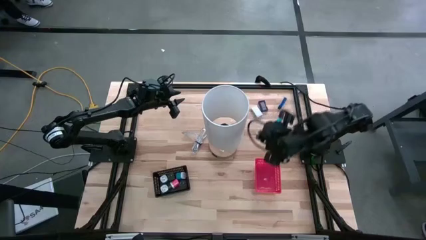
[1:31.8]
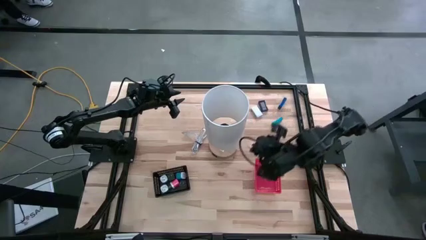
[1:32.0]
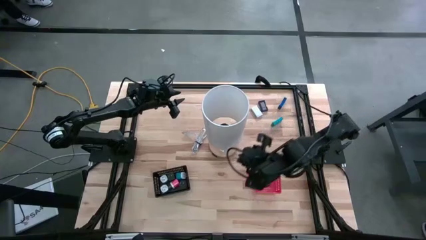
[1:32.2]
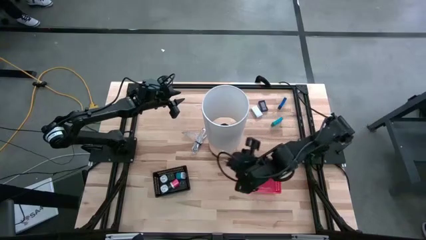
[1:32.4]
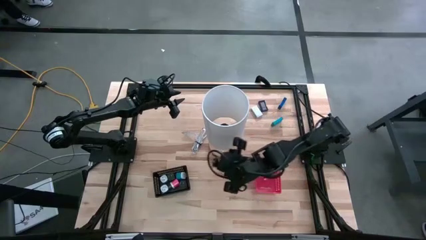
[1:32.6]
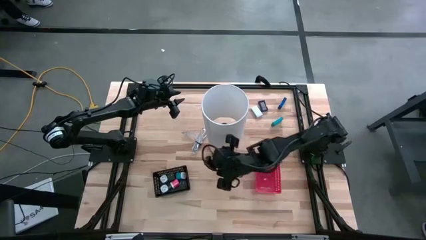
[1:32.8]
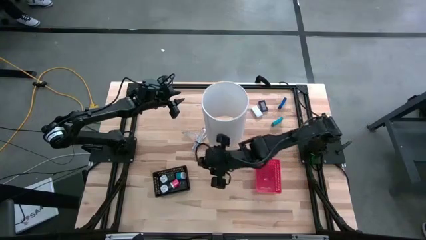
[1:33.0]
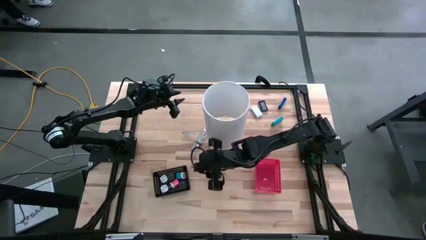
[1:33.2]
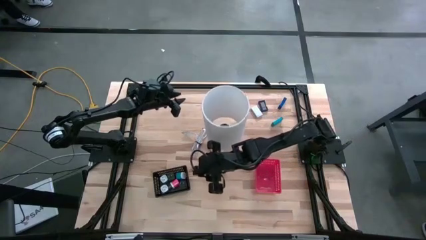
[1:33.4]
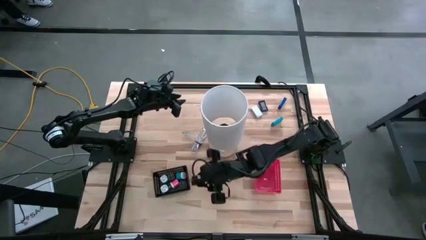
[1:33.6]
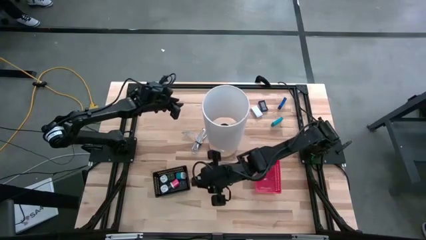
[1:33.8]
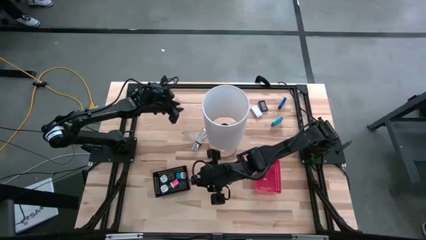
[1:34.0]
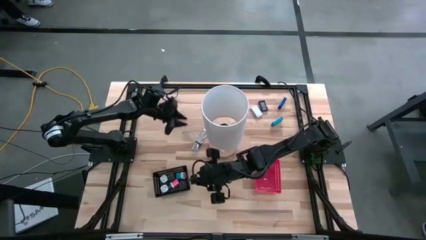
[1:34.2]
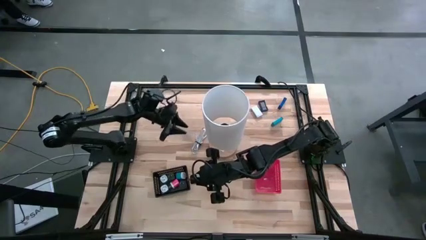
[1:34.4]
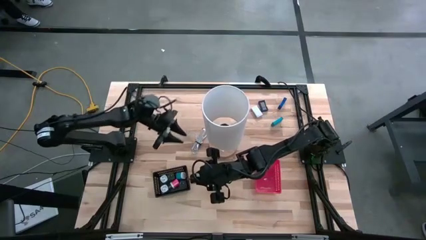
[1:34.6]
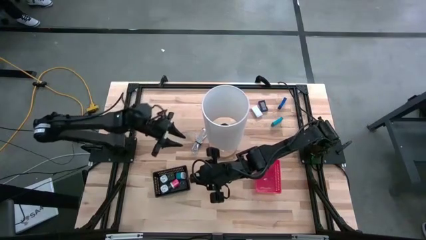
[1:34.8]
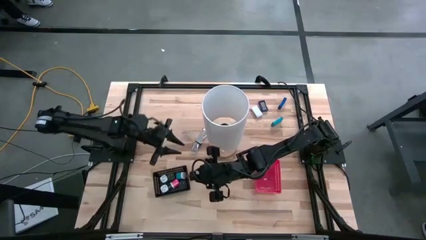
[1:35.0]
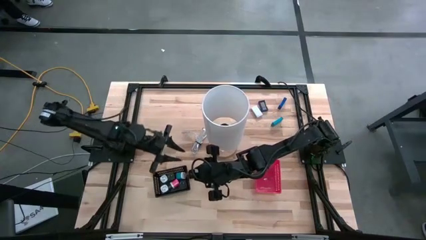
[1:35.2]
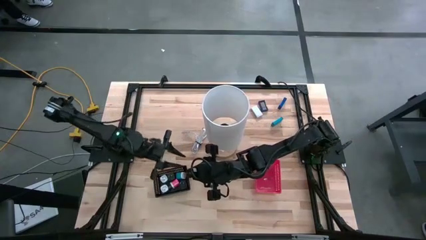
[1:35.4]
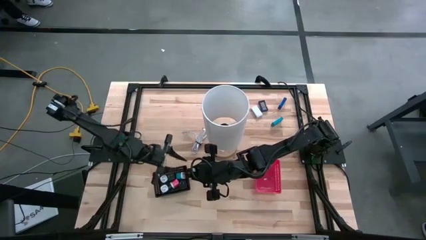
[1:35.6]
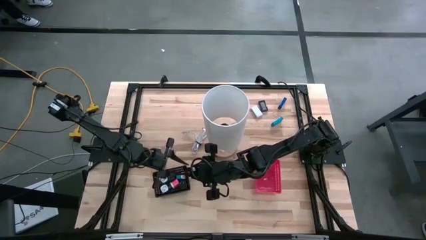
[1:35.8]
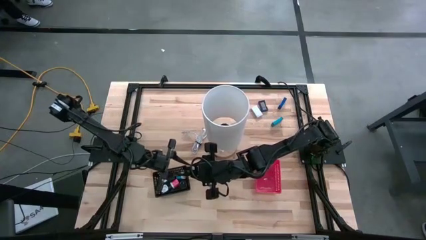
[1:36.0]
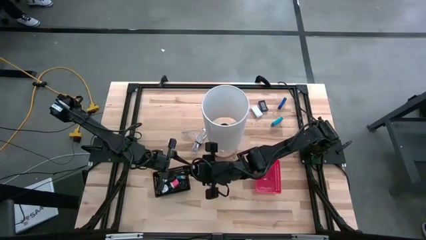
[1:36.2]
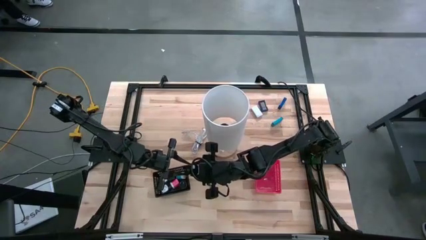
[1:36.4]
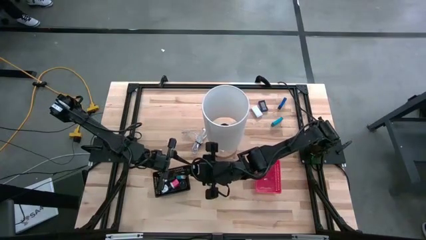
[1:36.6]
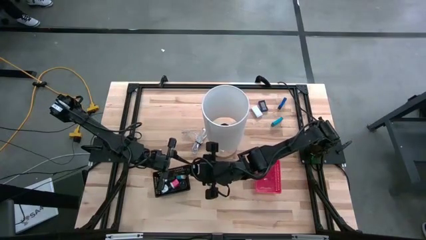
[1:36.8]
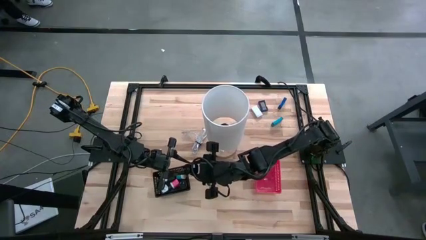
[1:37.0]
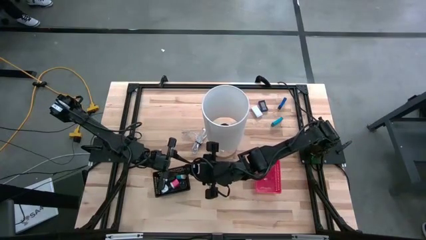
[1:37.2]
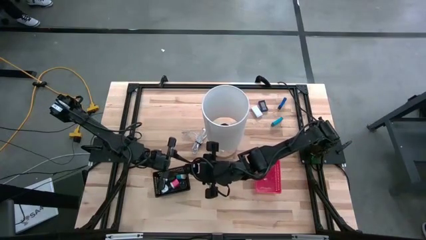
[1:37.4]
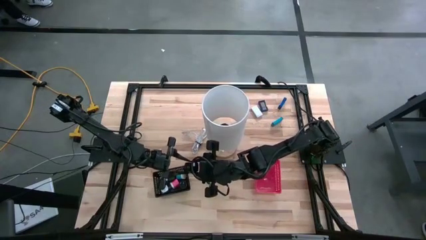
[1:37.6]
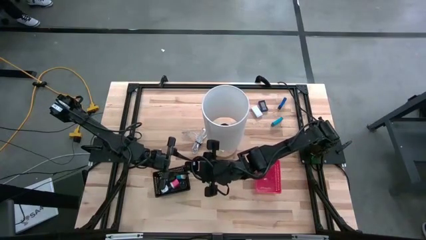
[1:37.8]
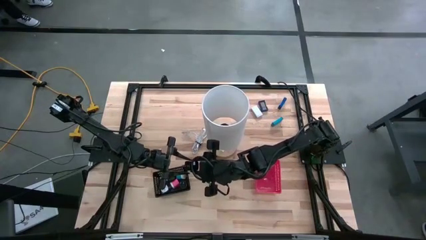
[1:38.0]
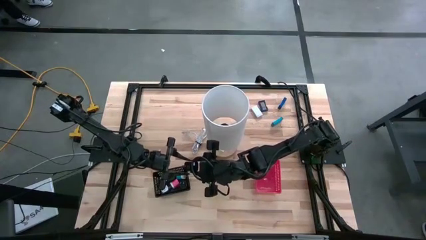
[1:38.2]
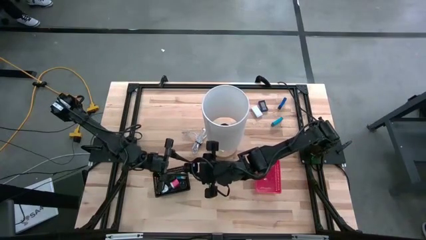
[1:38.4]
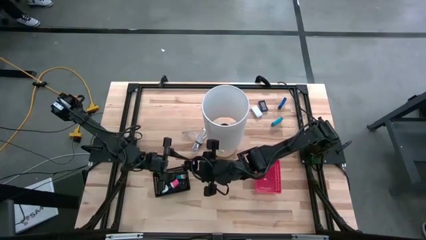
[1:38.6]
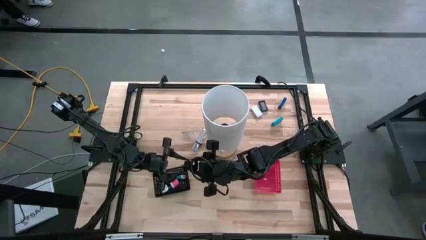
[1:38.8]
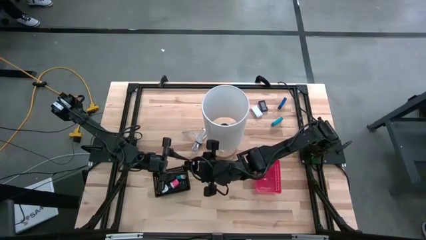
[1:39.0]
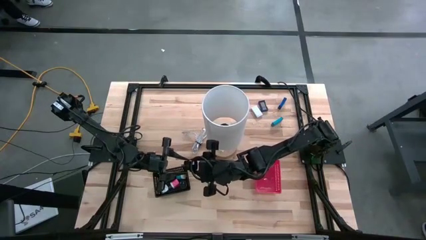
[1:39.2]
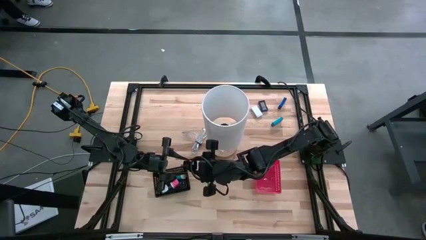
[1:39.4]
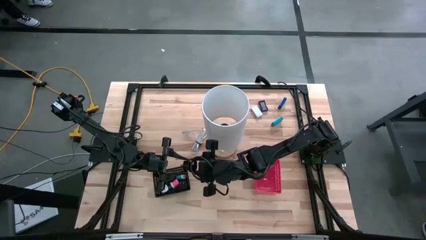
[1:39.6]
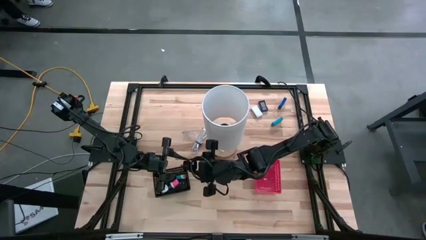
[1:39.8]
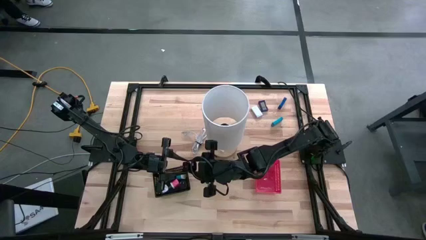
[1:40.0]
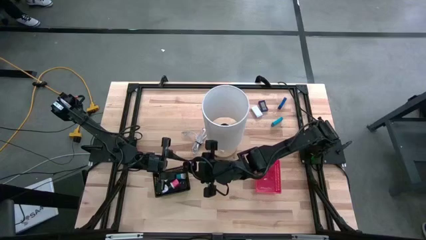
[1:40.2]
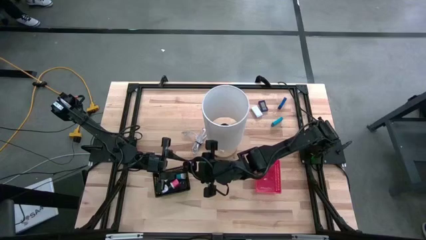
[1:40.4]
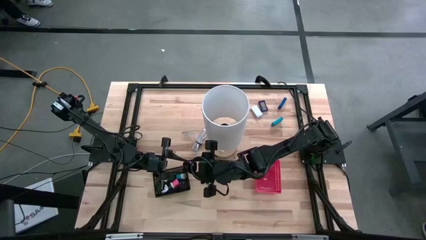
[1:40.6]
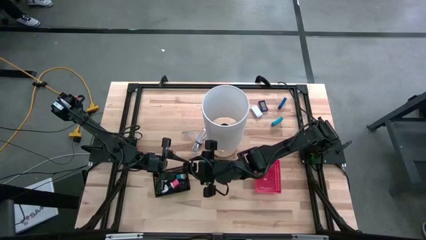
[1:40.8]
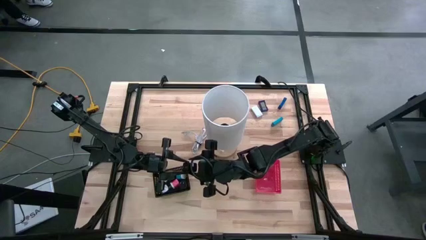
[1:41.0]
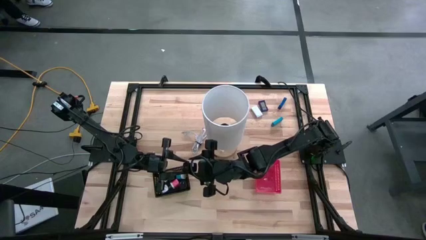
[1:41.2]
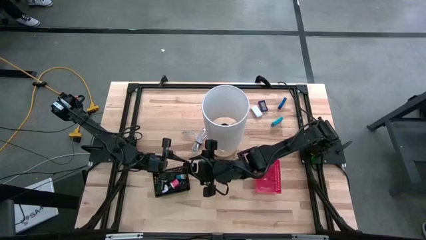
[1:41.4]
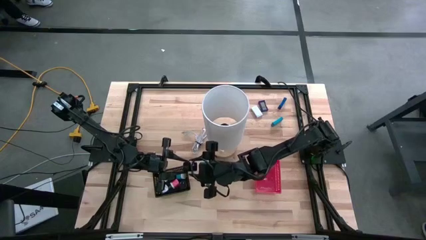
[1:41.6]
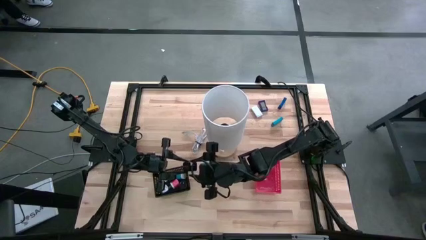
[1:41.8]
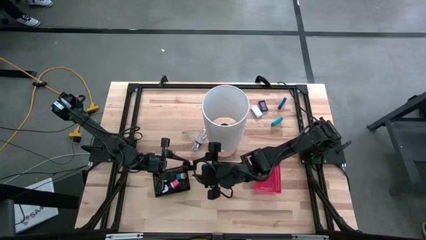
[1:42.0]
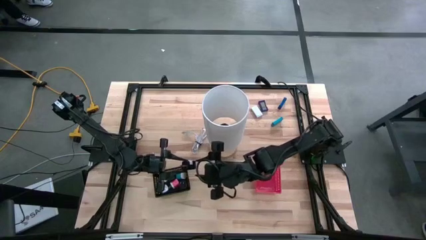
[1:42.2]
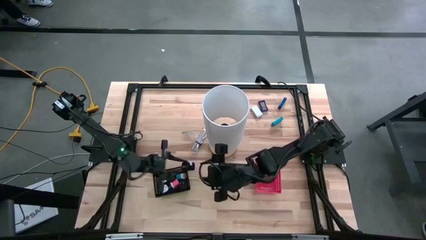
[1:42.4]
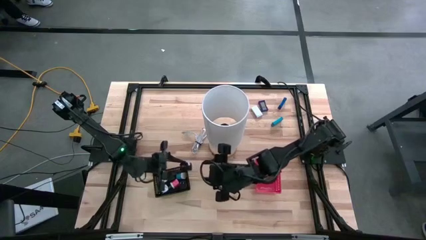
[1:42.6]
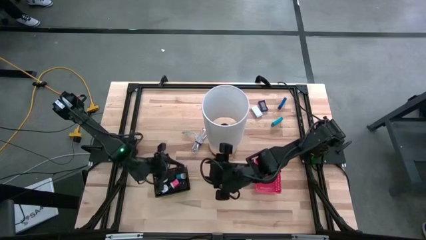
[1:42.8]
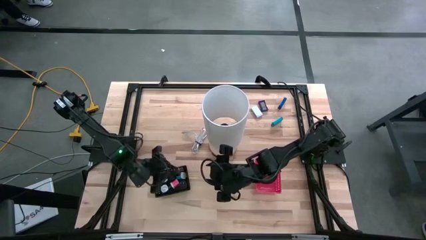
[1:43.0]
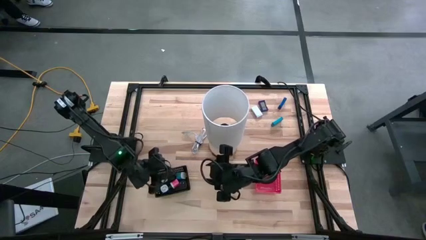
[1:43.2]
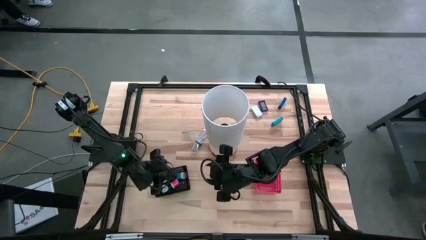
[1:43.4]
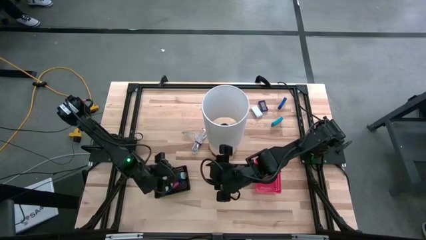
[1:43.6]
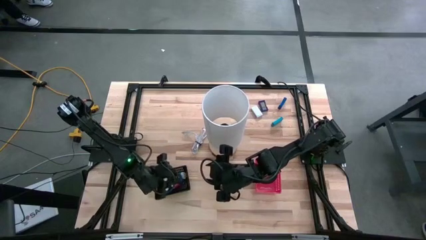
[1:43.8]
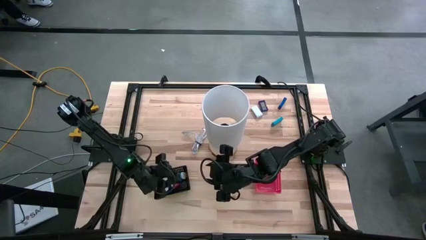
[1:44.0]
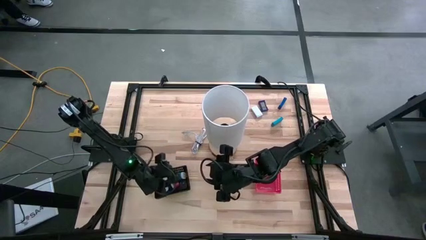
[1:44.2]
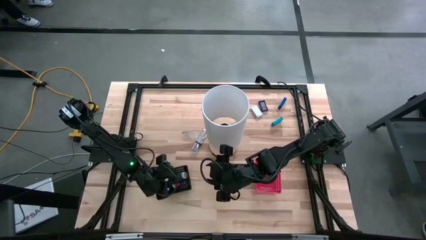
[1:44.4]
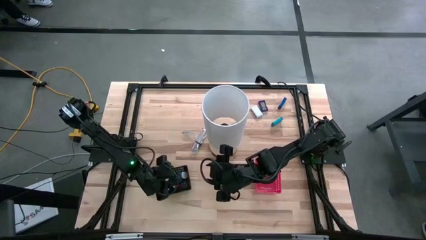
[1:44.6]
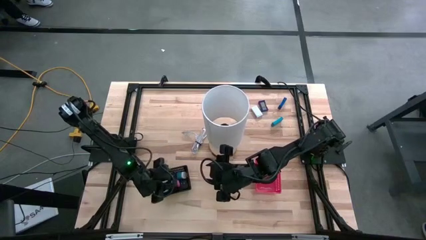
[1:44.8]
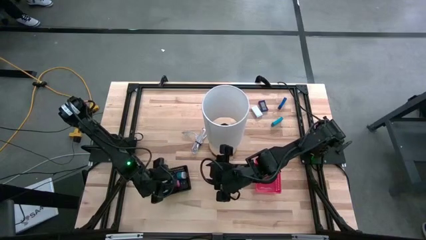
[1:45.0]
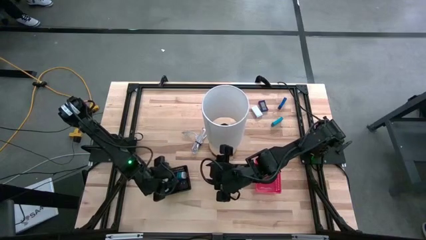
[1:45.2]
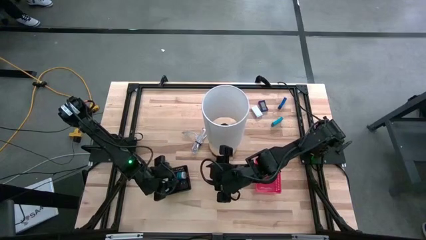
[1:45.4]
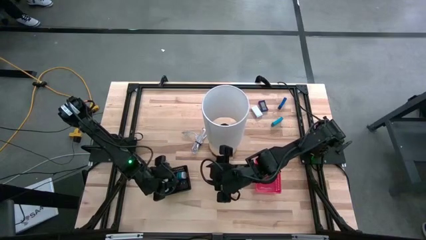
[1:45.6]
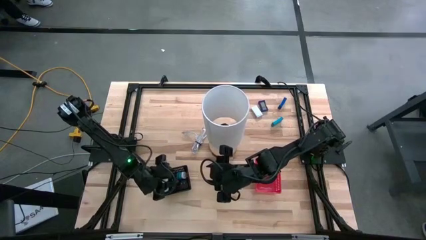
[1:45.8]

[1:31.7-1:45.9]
Task: Pick & Place Office items
Put the black charger adapter into the black bin
